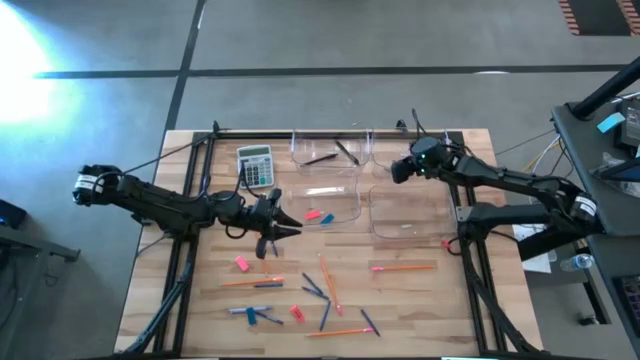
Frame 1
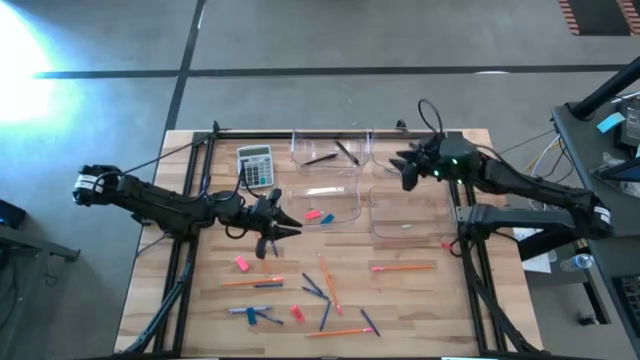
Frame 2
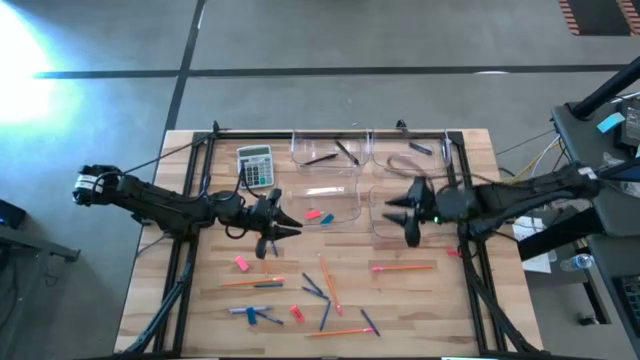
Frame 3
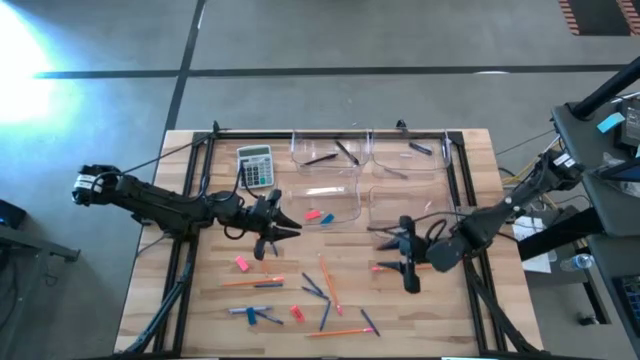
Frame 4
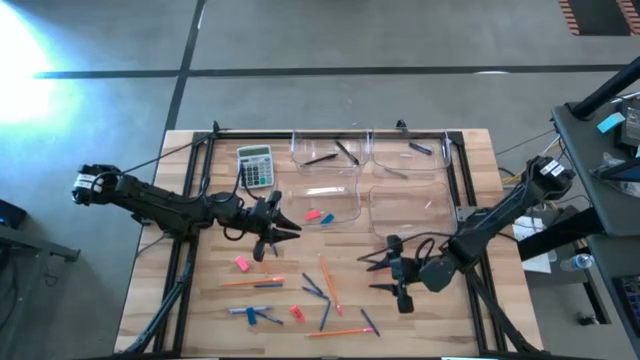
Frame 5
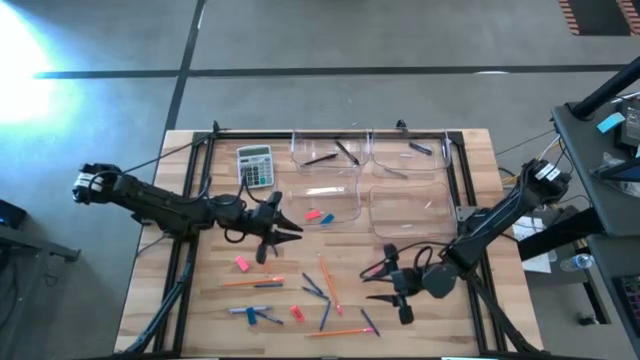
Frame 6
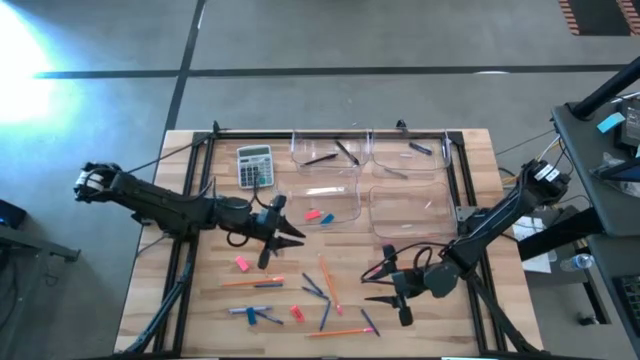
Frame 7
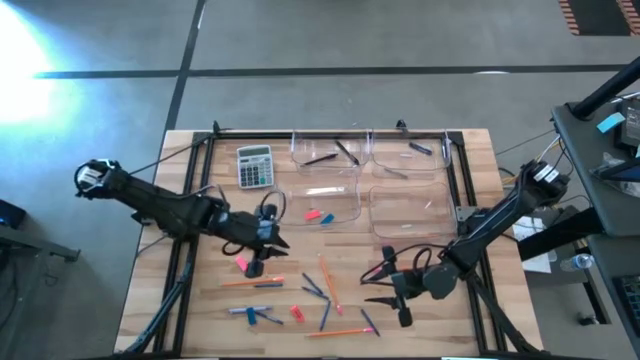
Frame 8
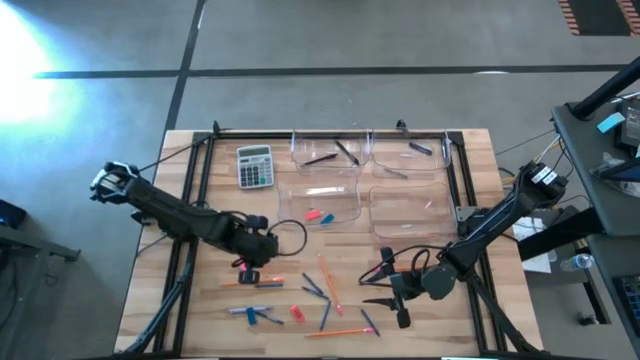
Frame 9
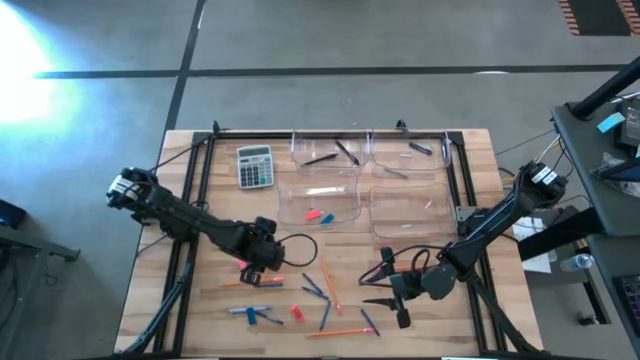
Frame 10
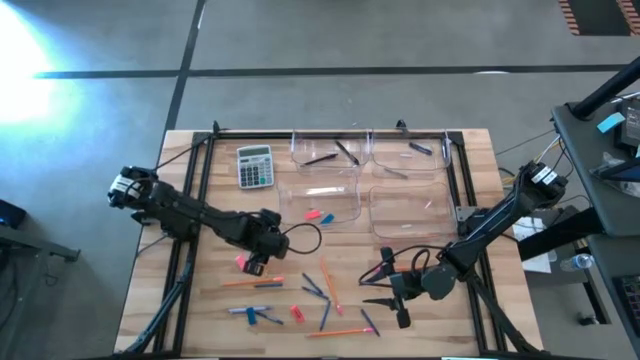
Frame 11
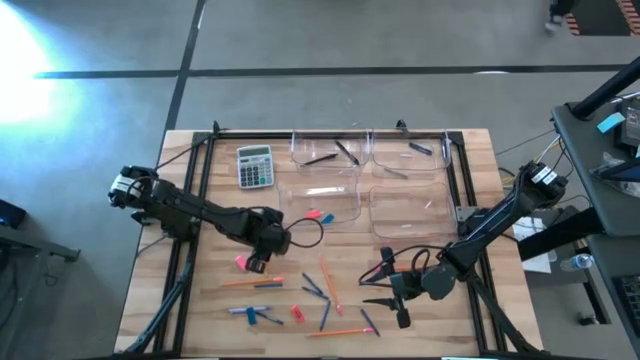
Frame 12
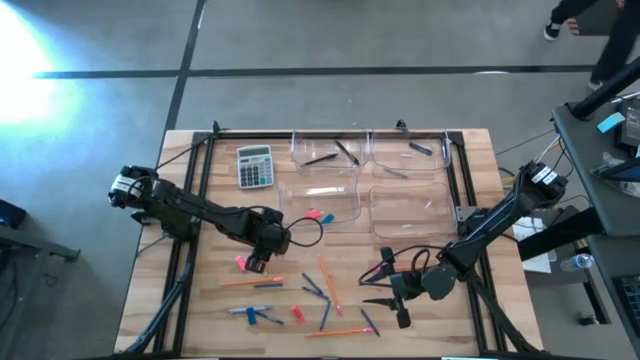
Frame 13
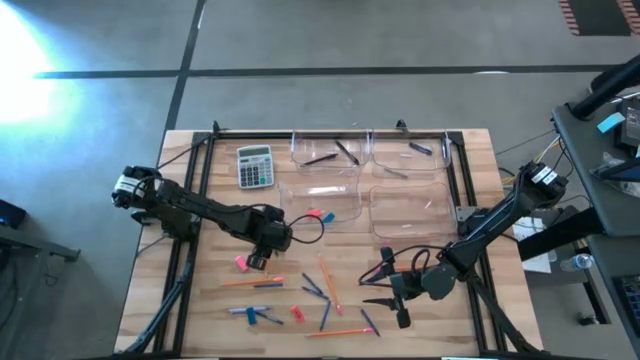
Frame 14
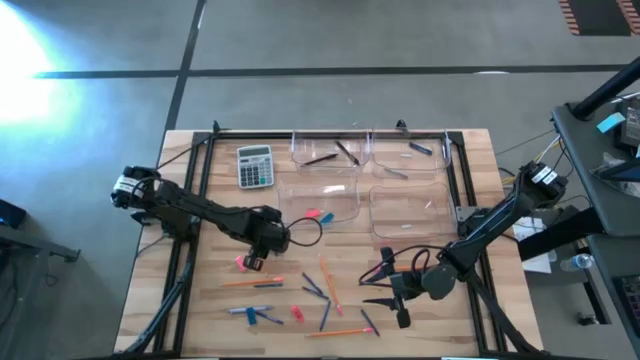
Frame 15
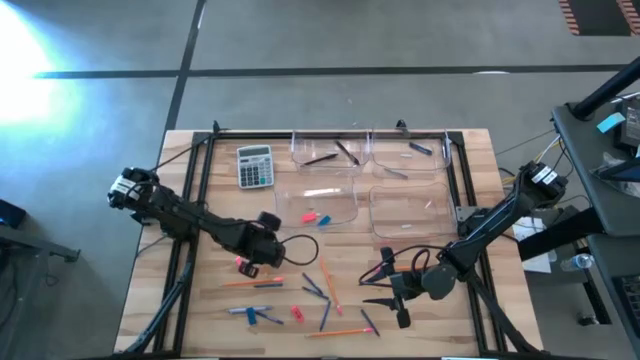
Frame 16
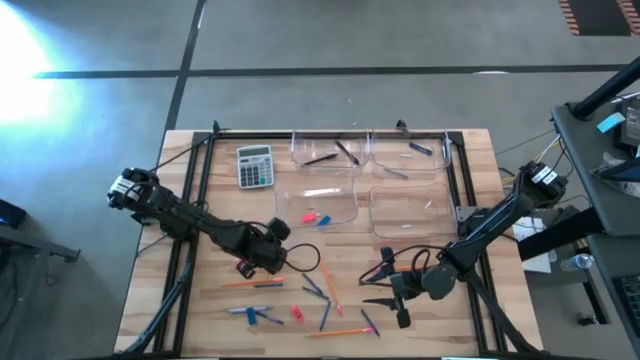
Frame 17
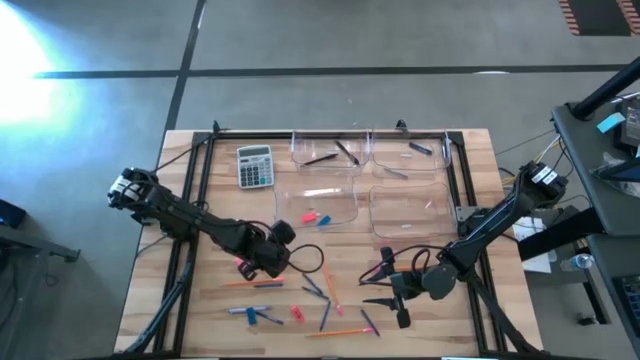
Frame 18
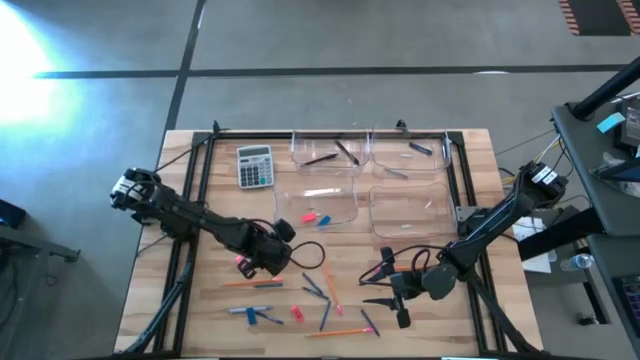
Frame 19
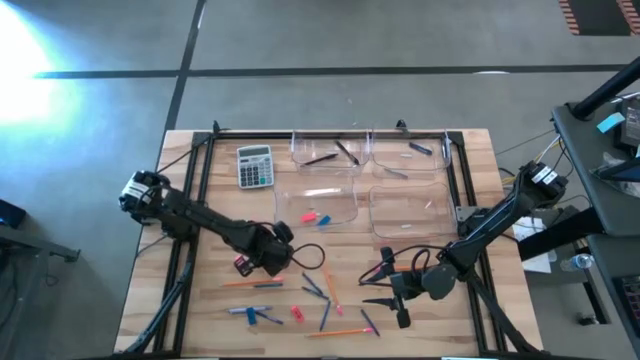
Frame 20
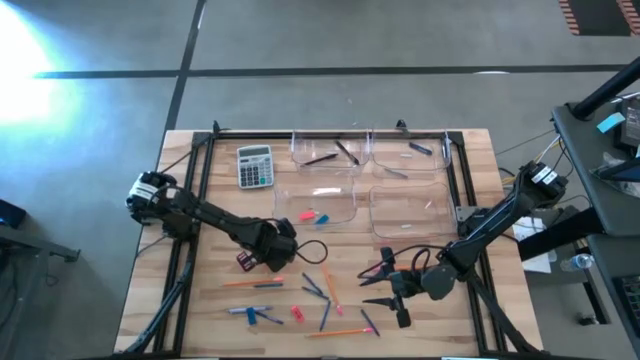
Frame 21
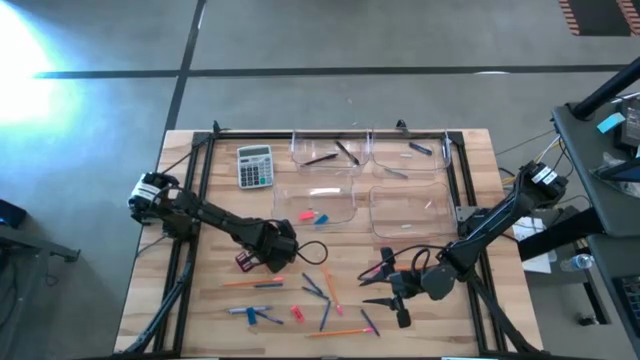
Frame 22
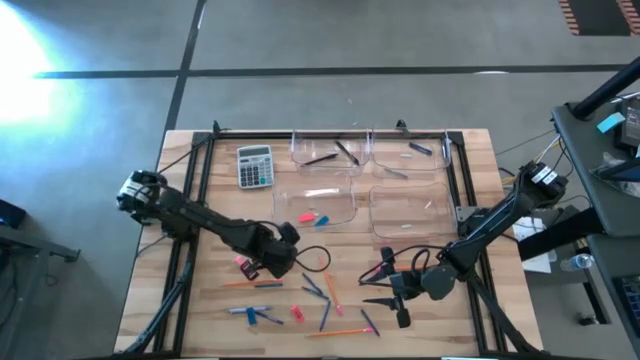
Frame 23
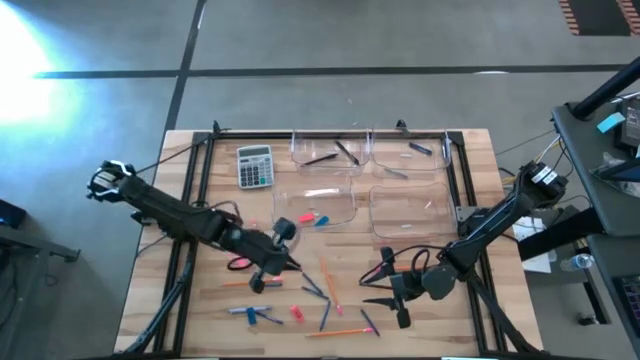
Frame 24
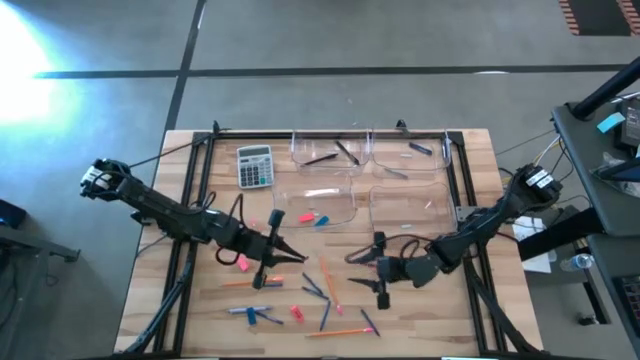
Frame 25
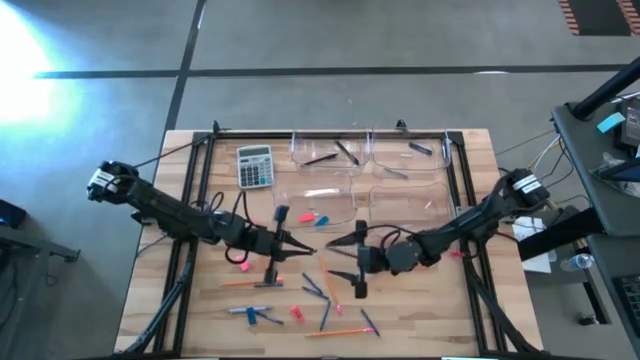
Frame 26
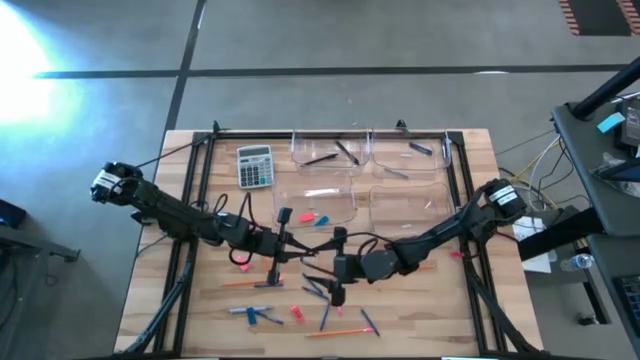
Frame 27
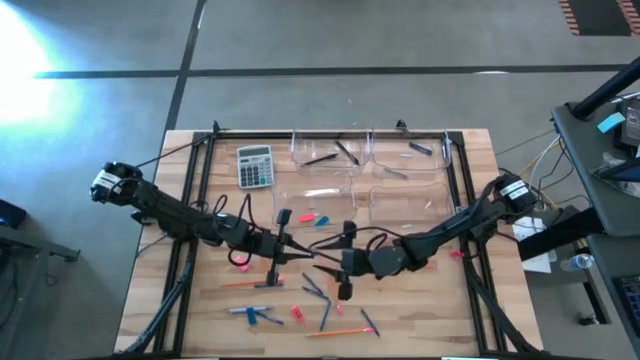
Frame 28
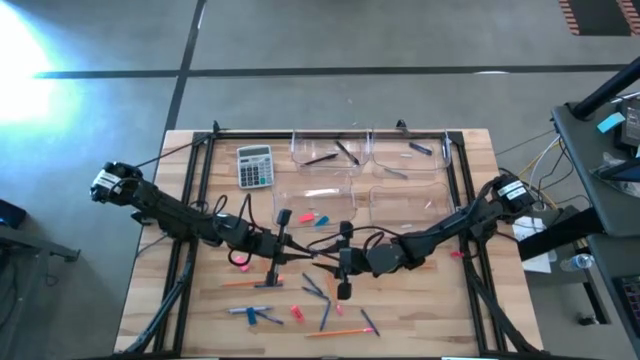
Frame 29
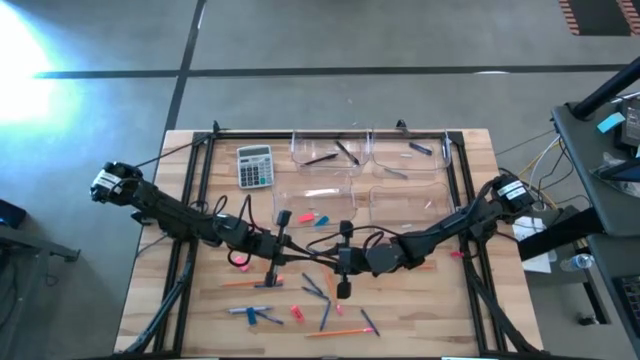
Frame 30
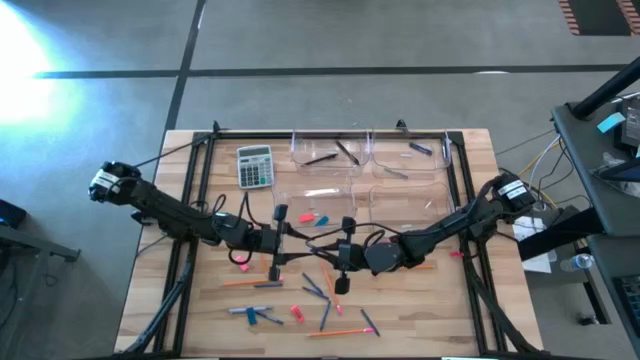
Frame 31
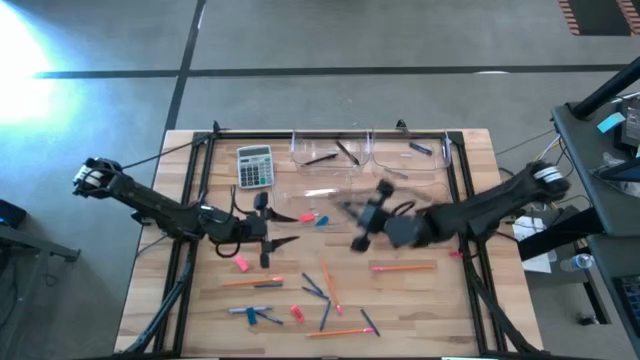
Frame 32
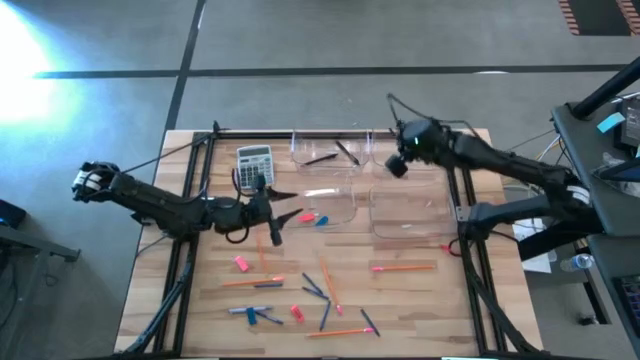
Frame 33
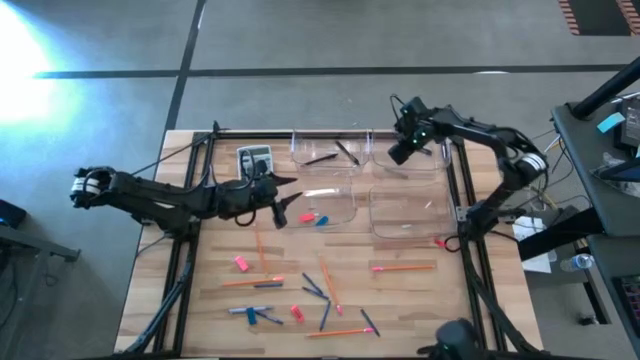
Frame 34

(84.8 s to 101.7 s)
Task: Sort crayons/erasers/pens/pencils in bins
Put the blue crayon into the top right transparent bin

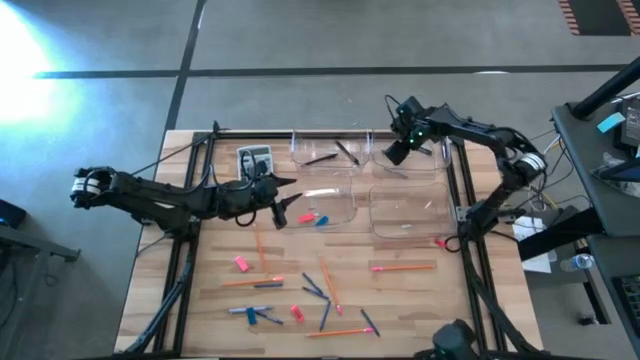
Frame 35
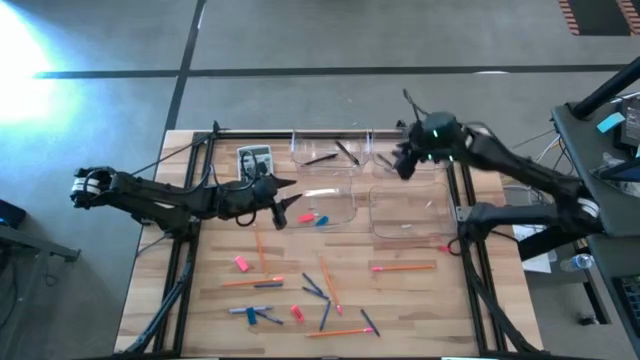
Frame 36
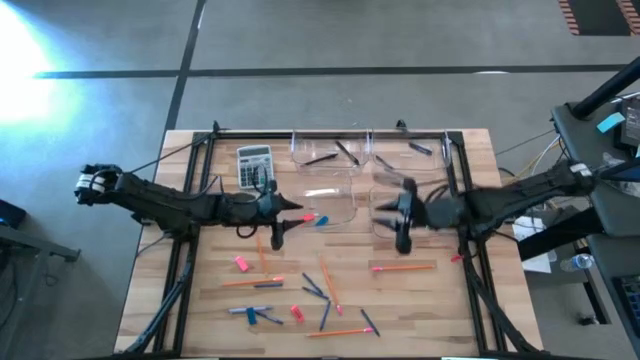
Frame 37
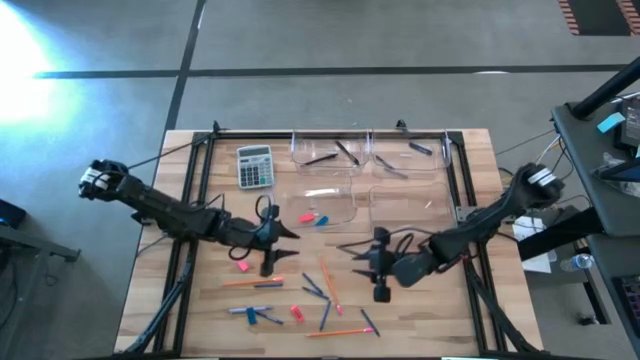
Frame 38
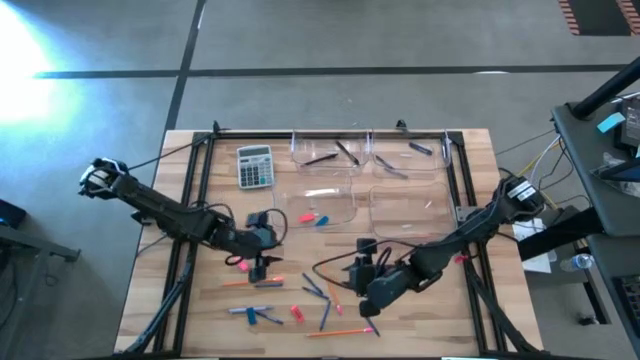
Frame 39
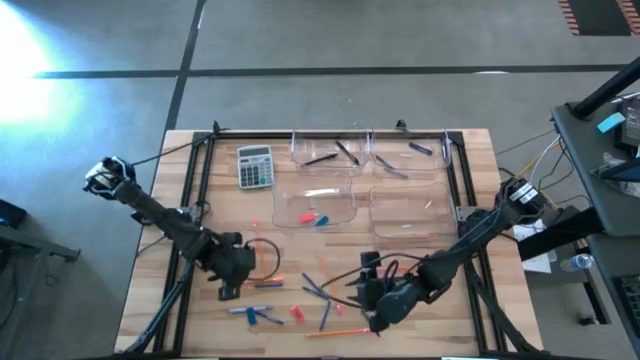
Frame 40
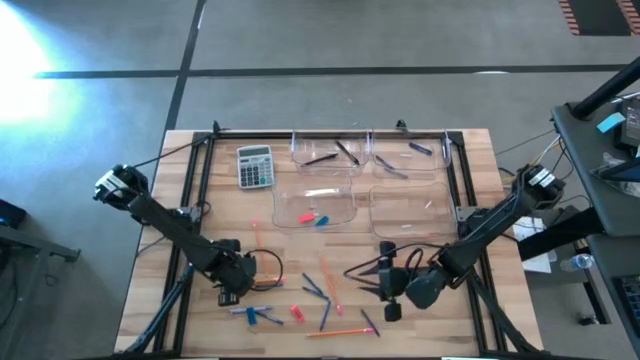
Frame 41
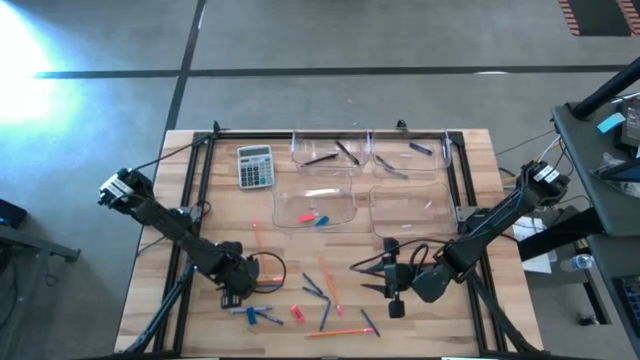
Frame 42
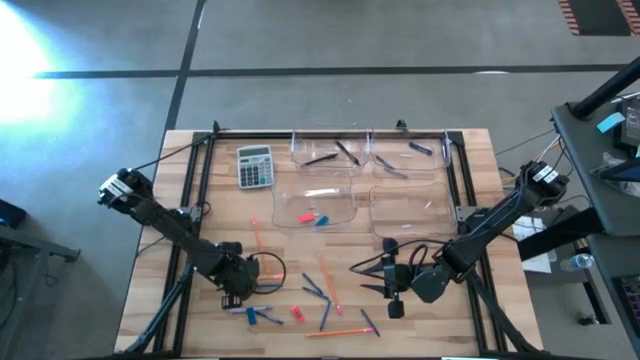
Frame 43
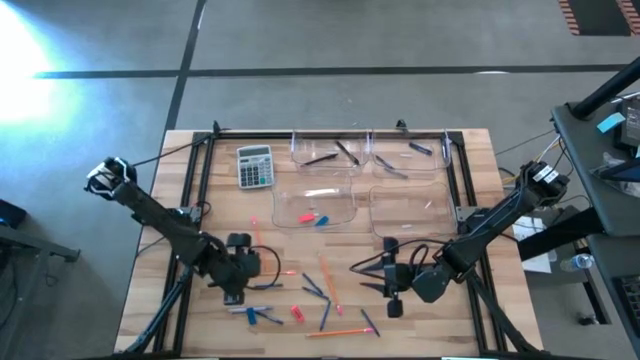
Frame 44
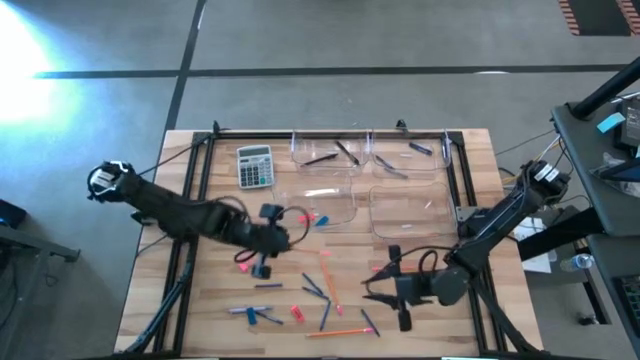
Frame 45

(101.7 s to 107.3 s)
Put the orange pencil into the bottom right transparent bin
